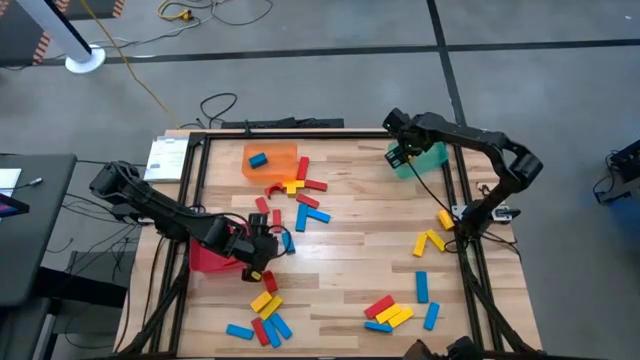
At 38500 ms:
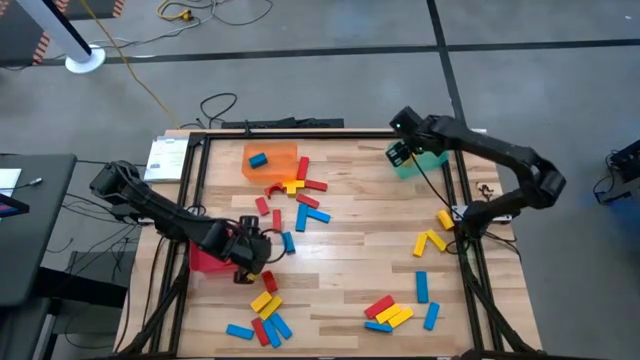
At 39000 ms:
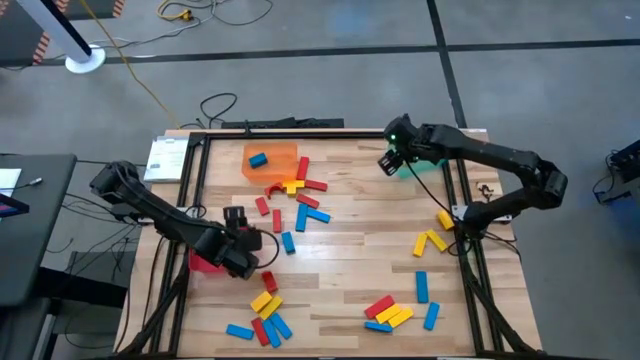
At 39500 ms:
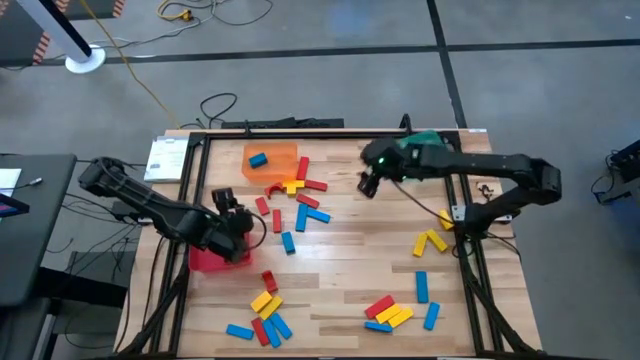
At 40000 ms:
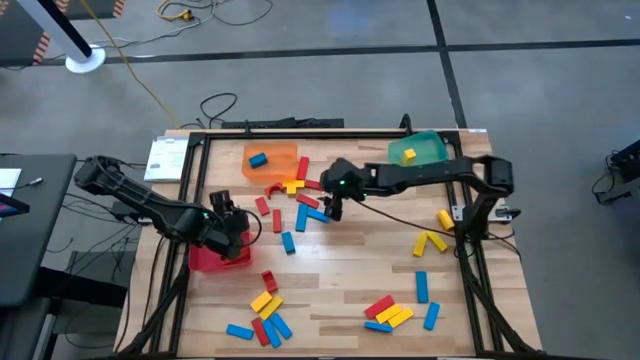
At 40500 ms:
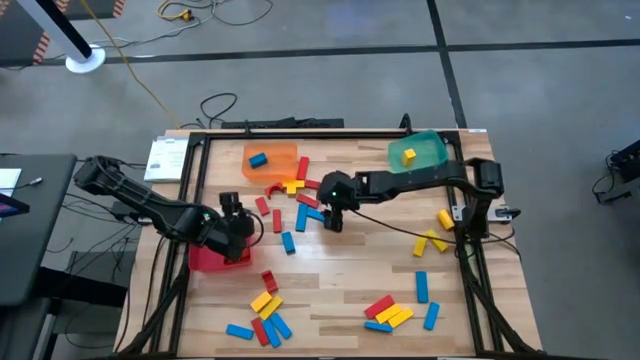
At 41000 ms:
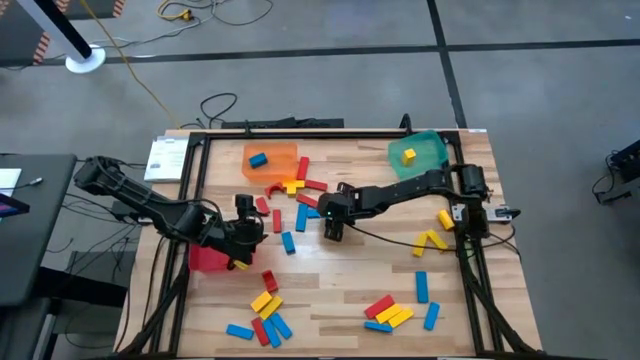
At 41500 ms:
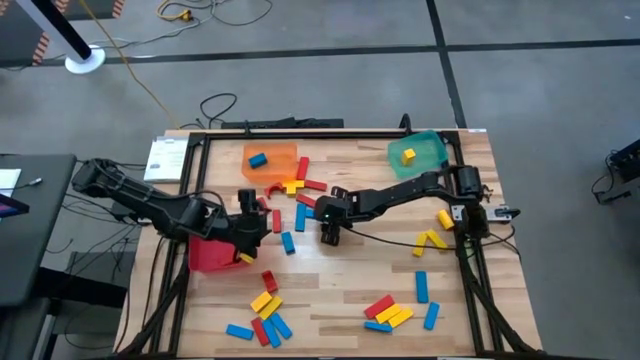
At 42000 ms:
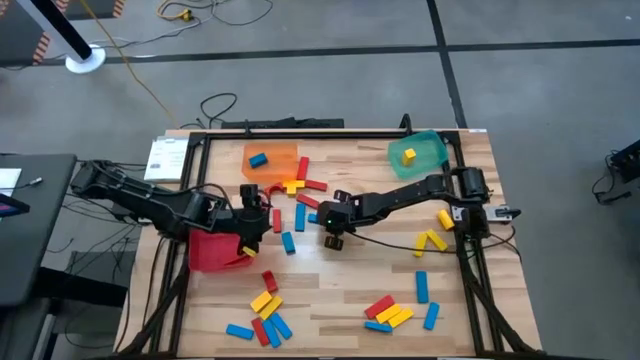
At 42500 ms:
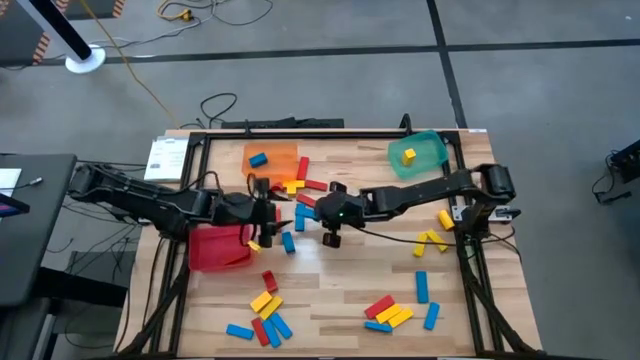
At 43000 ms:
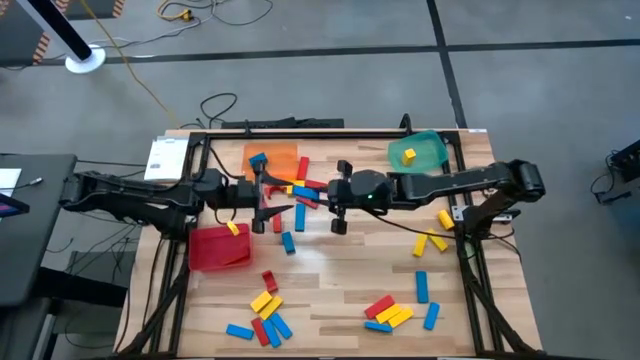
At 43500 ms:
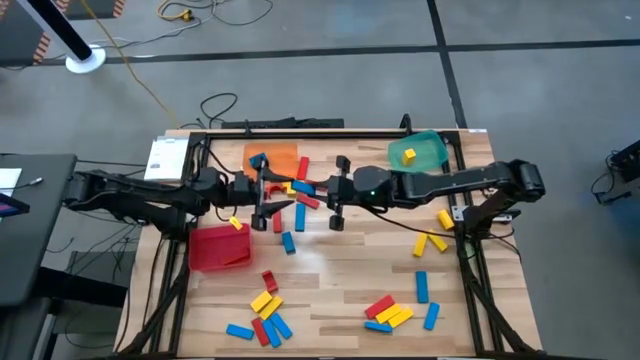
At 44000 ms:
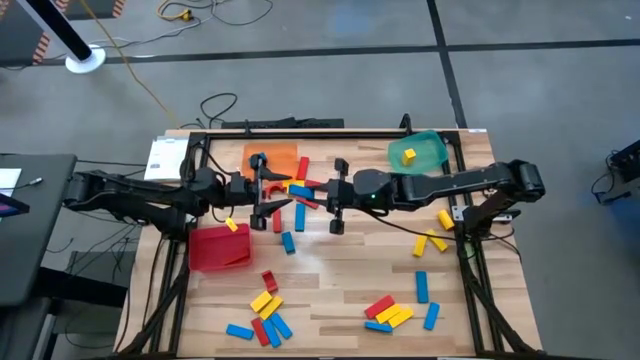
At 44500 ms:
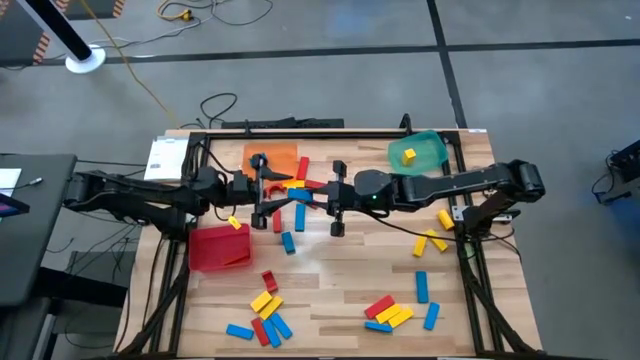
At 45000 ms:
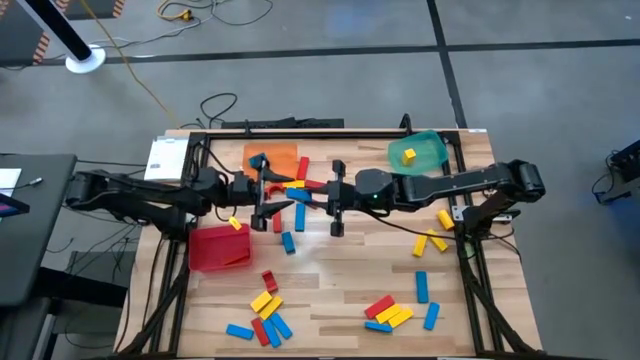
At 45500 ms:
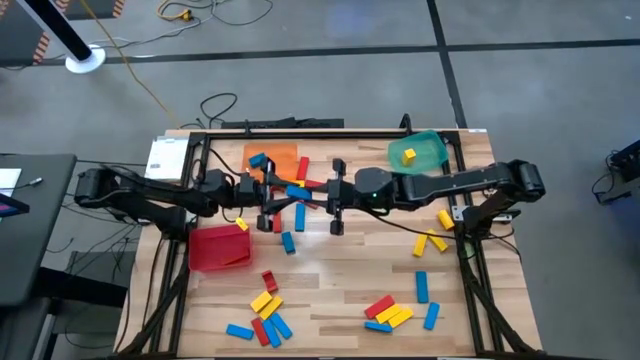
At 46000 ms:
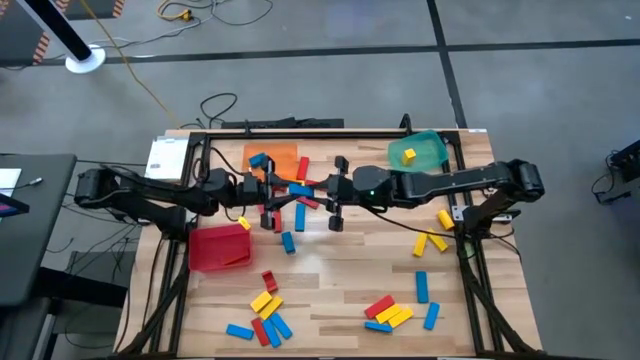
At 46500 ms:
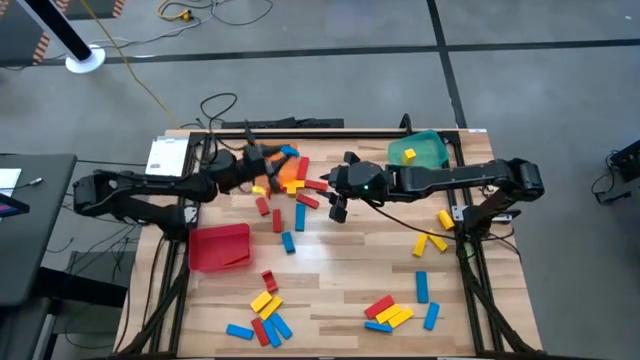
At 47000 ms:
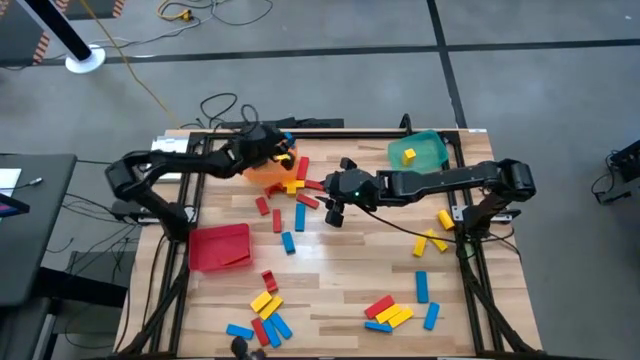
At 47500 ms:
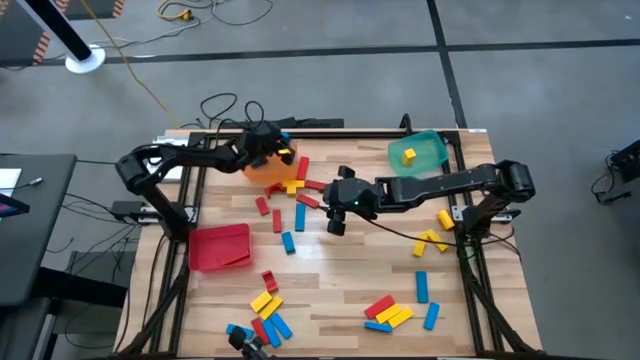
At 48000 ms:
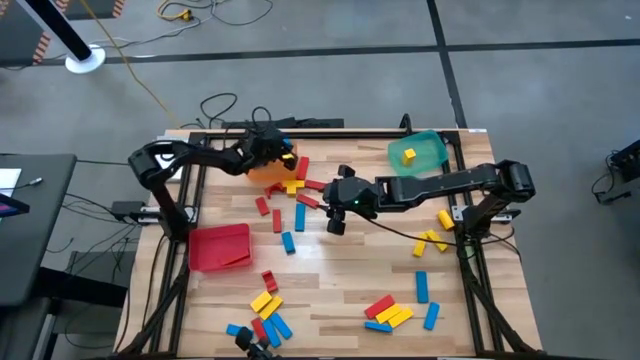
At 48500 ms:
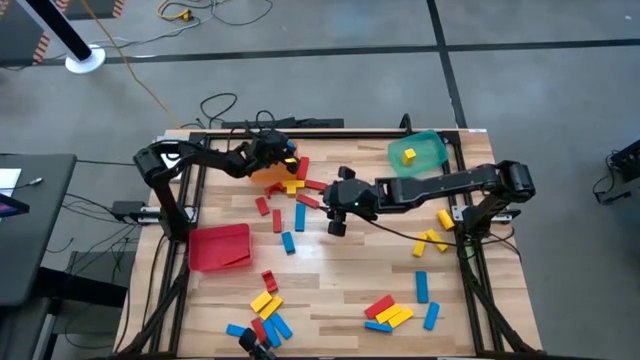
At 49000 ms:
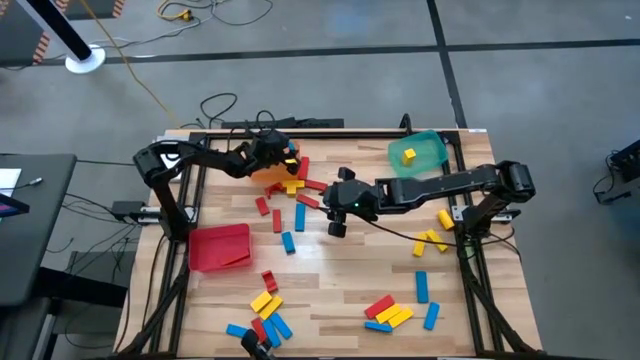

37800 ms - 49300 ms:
Task: Sort blocks
Put the blue block into the orange bin

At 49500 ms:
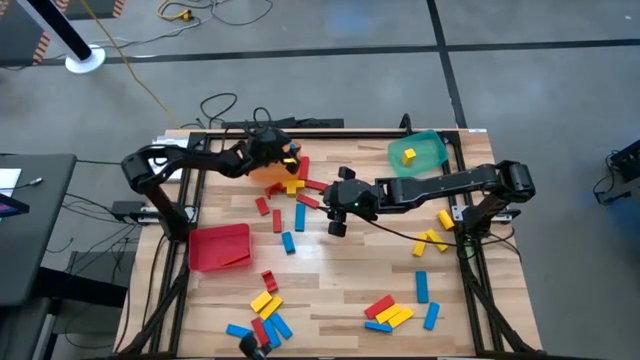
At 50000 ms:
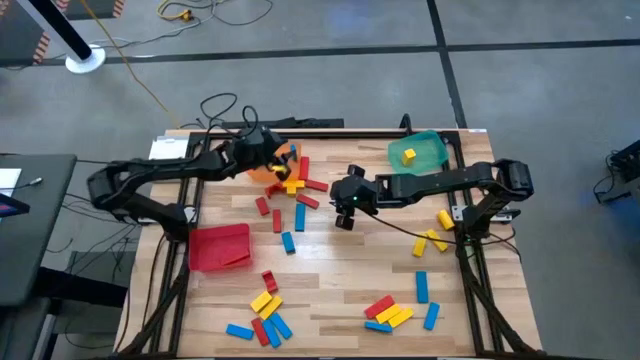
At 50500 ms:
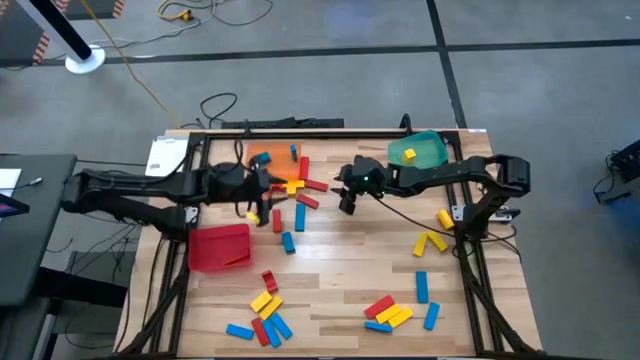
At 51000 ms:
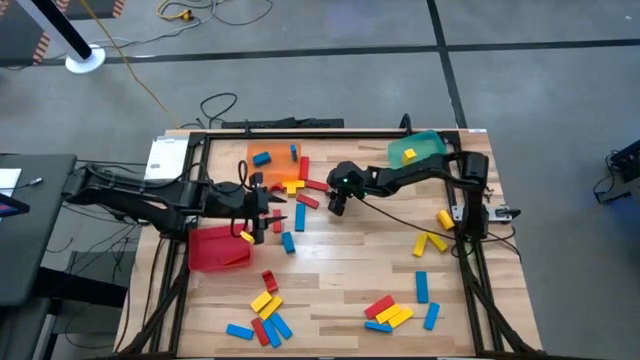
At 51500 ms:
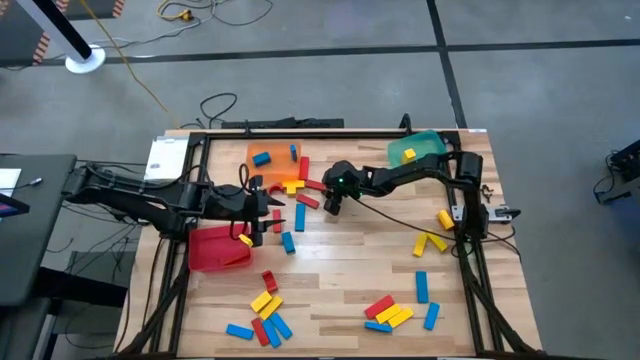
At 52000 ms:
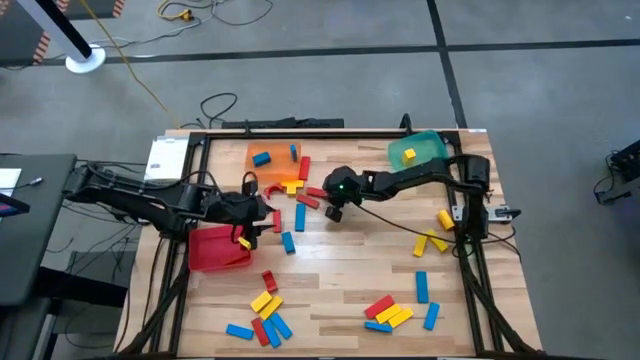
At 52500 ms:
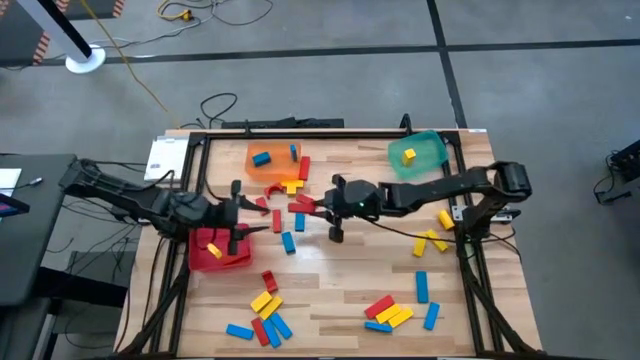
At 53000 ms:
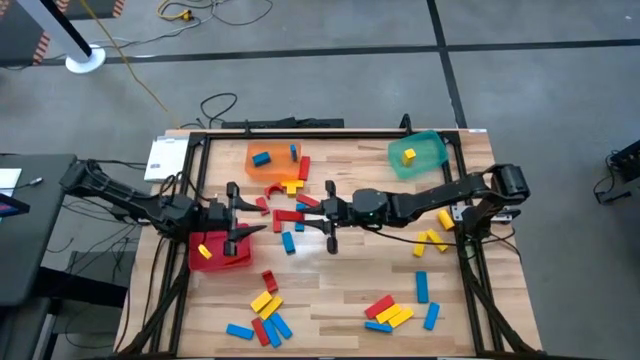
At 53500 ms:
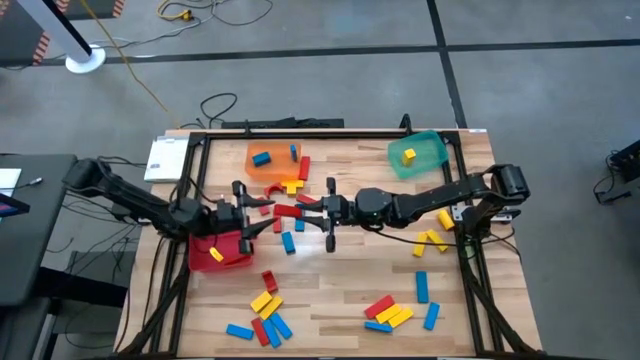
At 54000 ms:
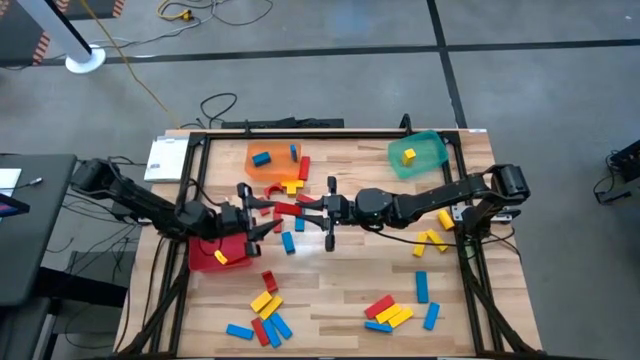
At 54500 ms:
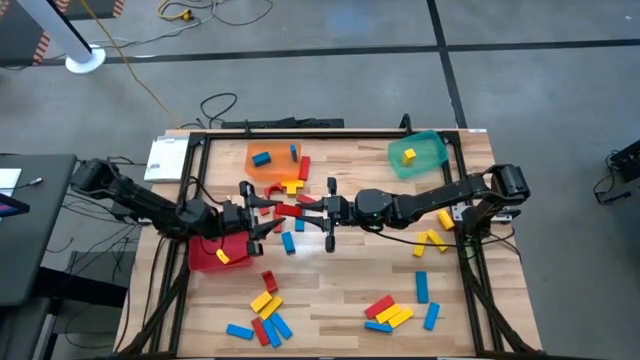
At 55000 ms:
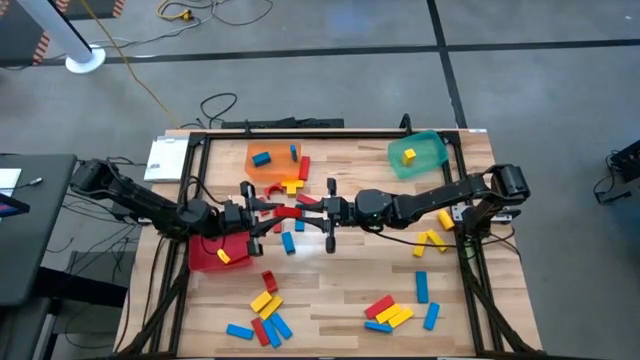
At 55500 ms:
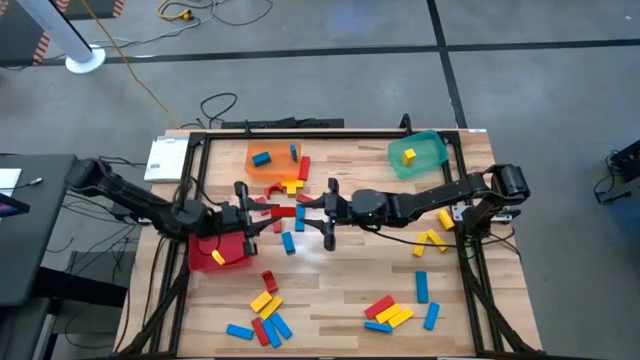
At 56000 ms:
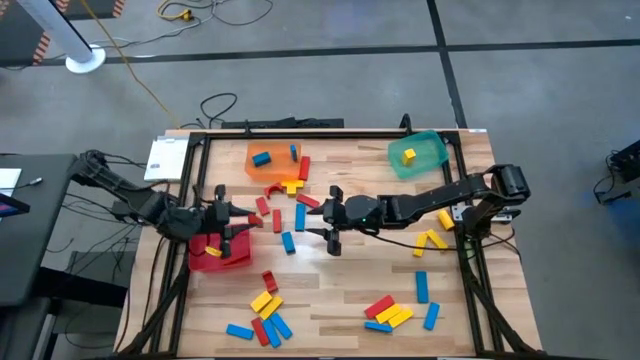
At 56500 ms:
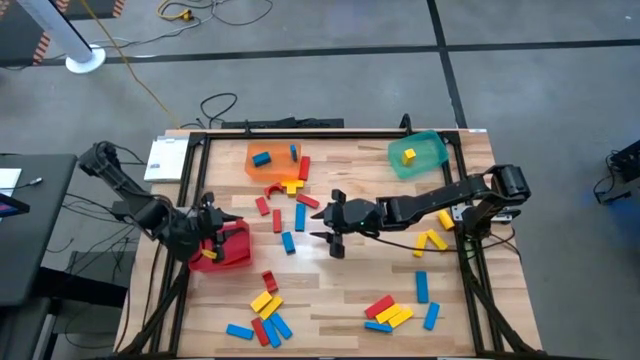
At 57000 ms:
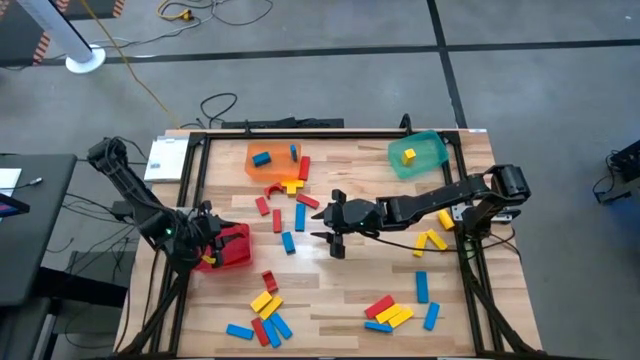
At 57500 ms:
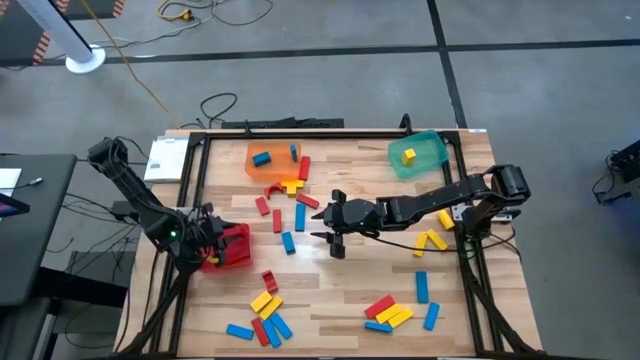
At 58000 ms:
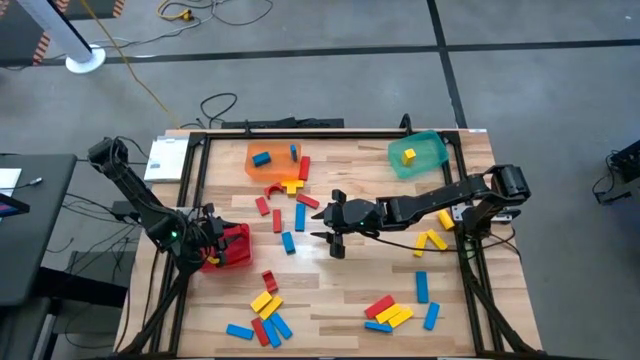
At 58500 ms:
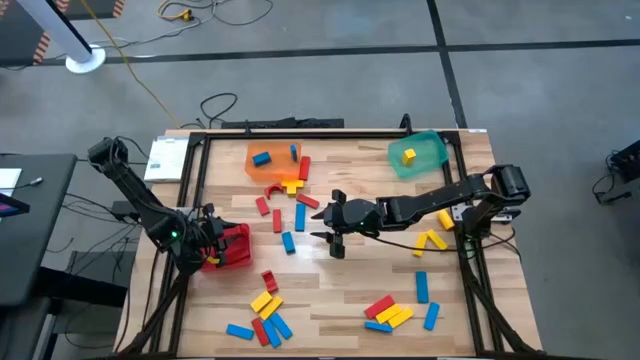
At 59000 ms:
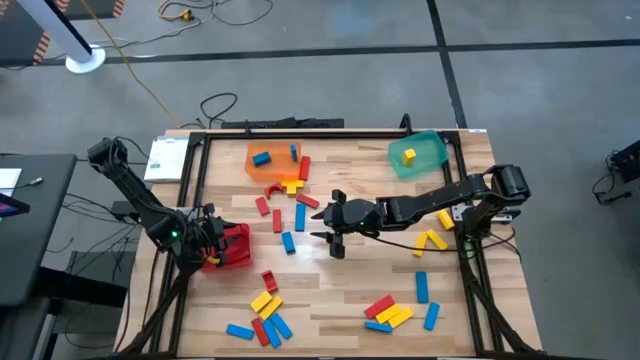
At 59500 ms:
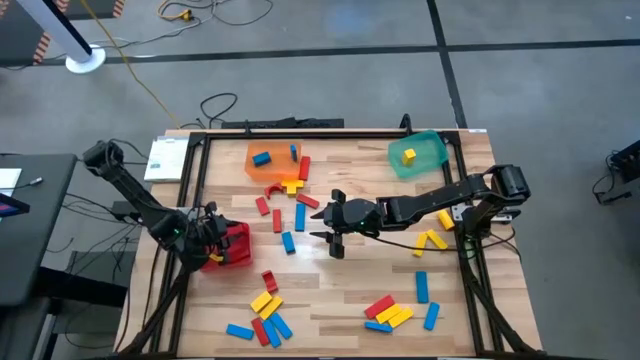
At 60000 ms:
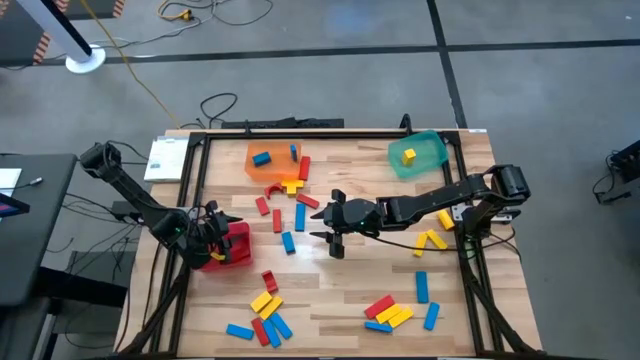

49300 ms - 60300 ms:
Put the red block into the red bin
